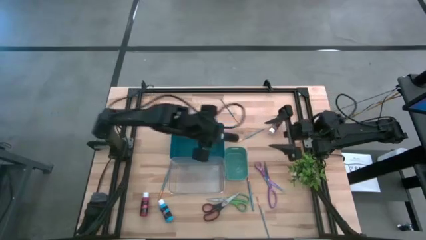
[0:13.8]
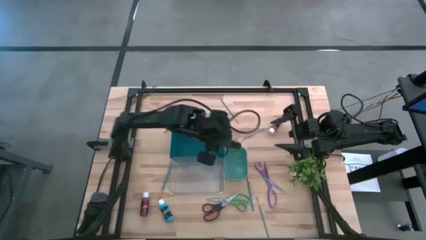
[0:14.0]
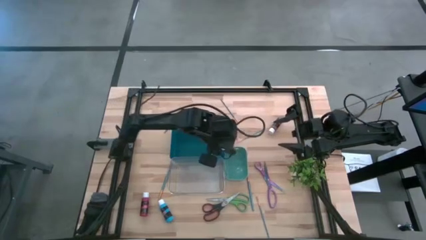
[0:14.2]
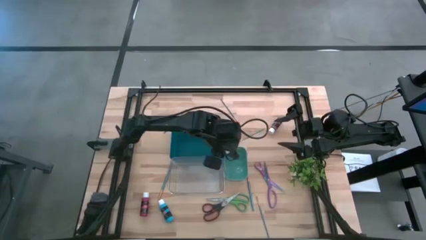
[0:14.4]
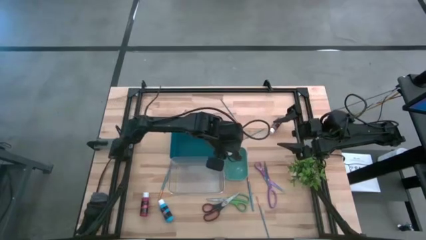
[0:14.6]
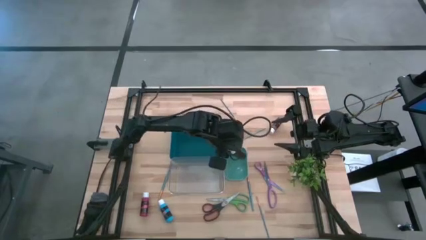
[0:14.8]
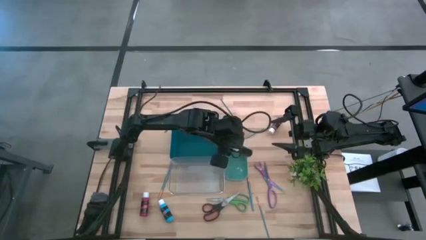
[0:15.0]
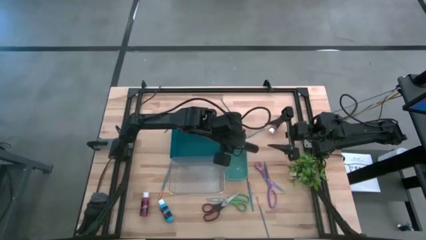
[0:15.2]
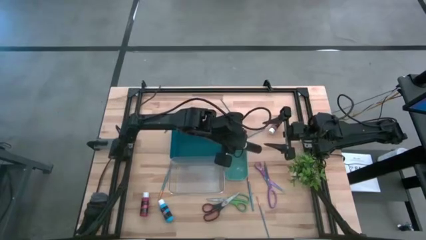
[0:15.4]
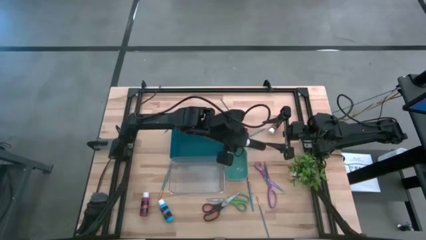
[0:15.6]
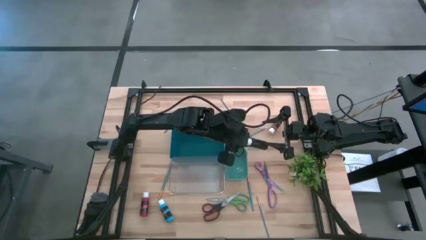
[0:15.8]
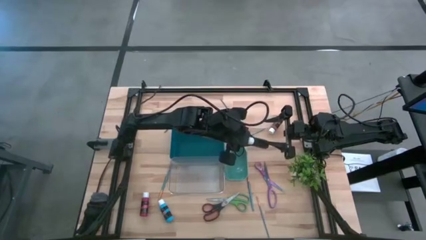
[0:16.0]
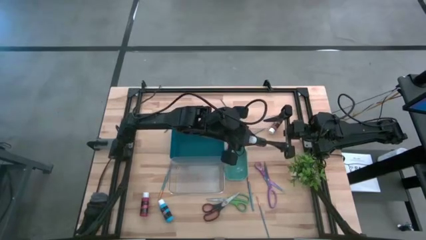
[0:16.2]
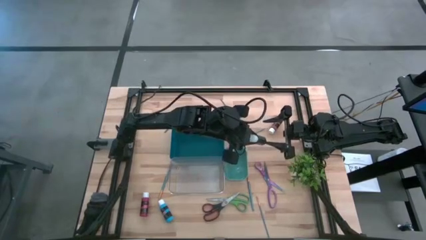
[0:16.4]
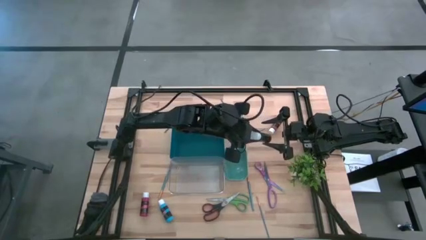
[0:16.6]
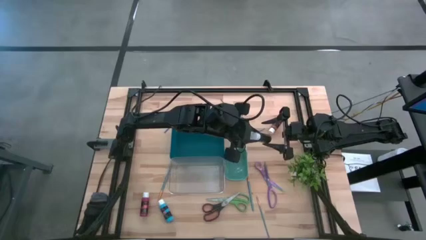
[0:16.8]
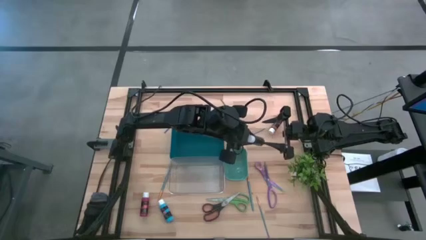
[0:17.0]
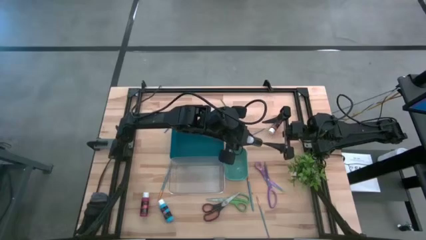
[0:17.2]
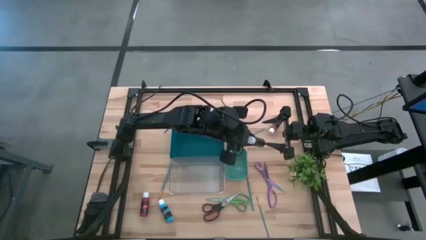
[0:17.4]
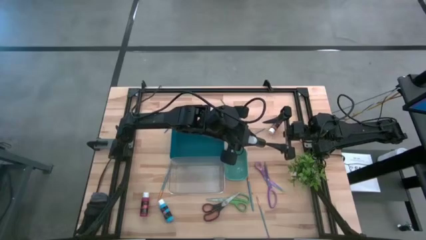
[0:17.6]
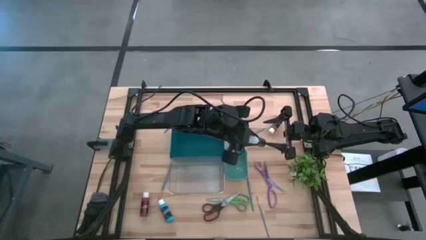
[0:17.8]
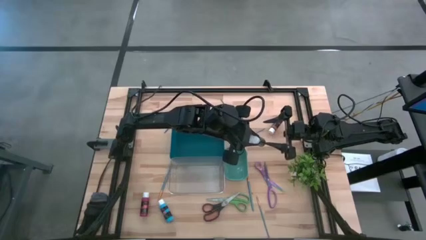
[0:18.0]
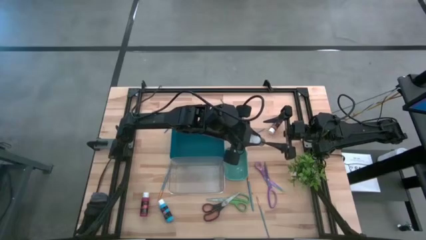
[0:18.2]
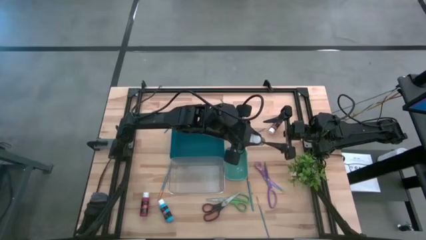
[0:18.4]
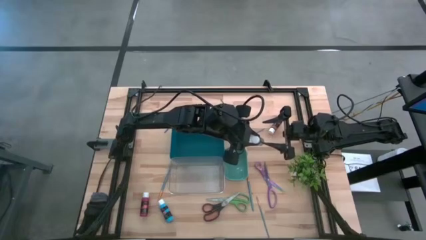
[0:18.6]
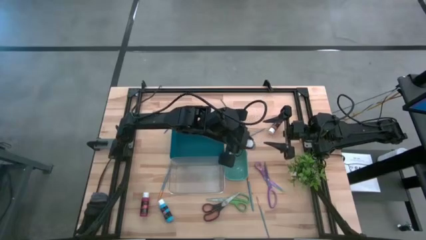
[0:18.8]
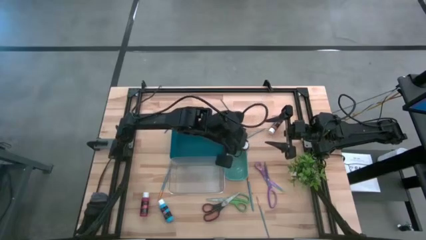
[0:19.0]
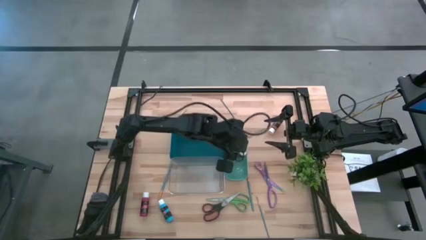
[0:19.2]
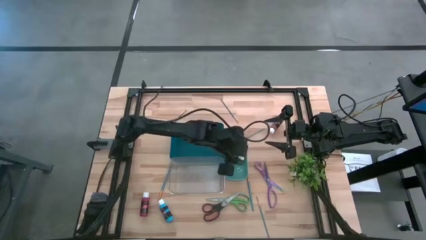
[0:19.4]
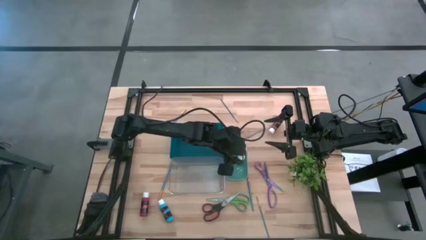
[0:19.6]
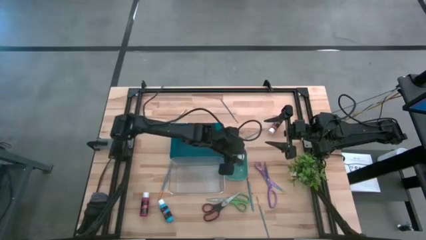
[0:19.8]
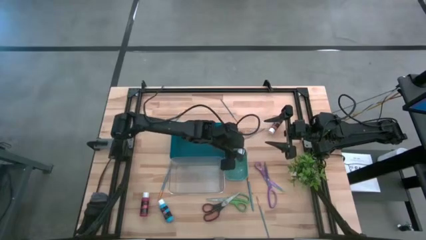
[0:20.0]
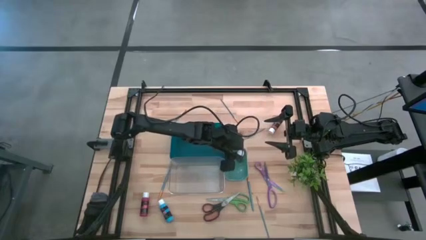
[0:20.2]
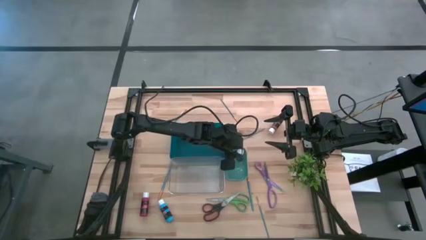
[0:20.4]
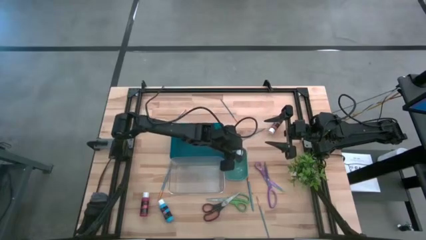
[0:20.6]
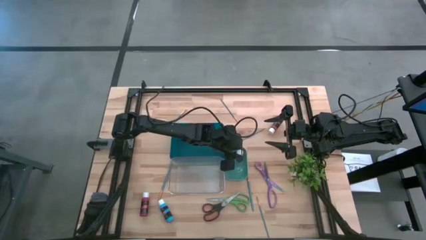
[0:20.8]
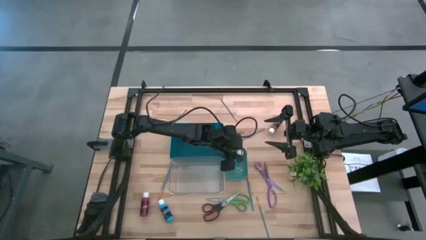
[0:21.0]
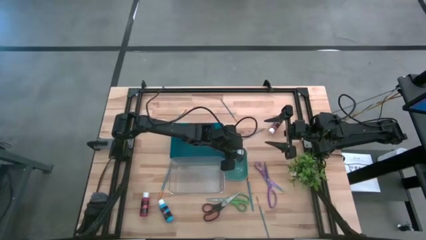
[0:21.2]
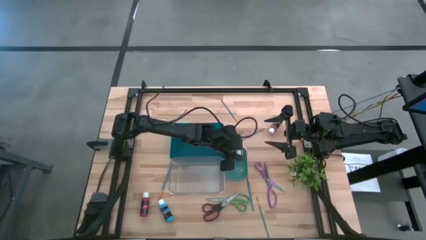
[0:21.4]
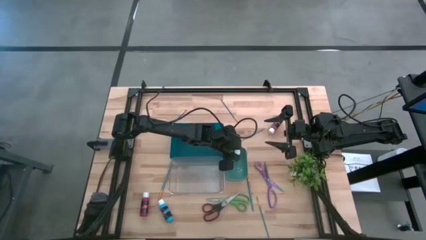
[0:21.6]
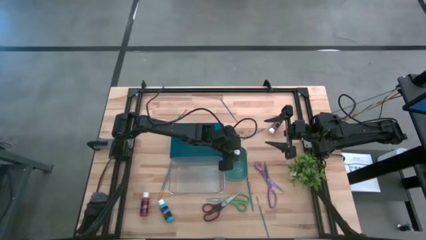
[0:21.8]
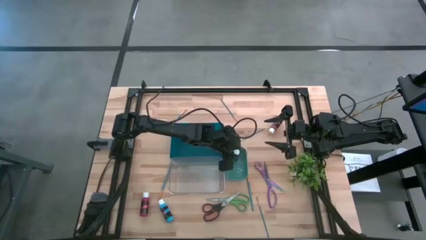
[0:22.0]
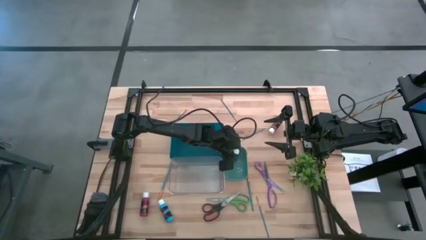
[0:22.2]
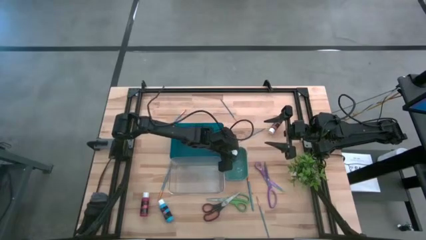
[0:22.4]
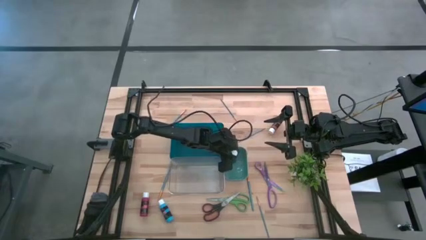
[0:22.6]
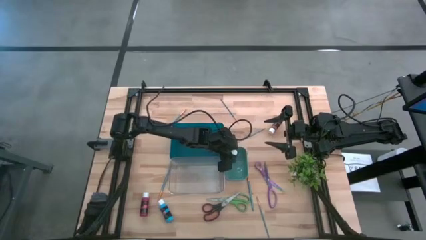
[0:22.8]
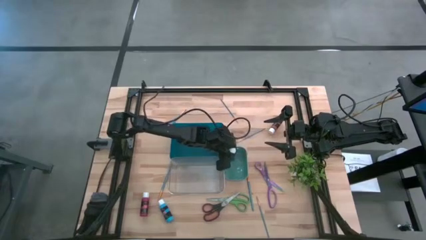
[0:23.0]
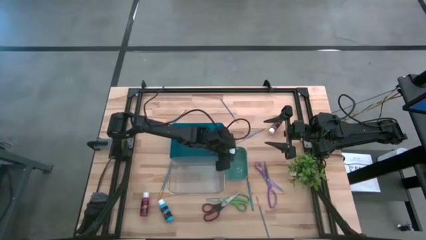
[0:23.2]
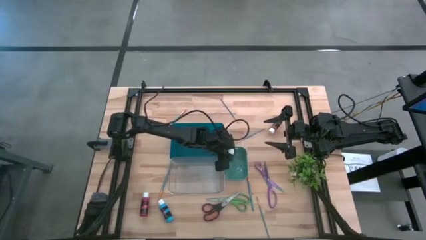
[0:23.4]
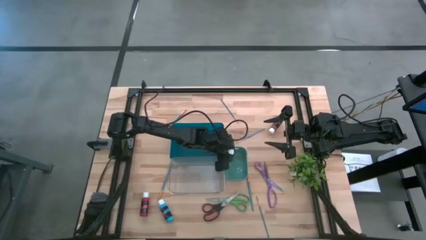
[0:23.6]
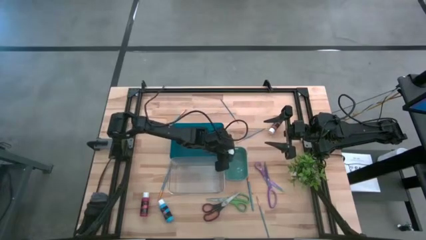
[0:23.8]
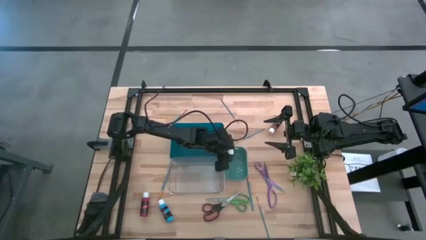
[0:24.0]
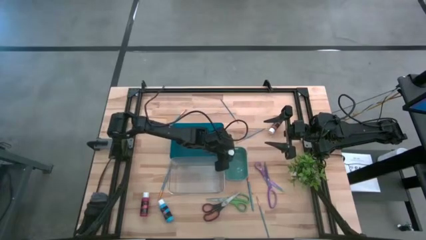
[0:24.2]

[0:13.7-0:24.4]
Task: Pick & Place Paint Supplies
Put the black paint bottle into the green bin

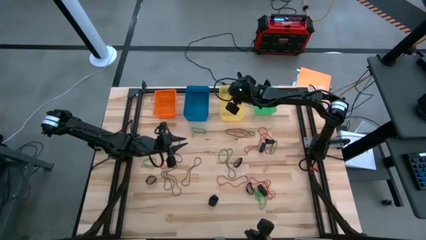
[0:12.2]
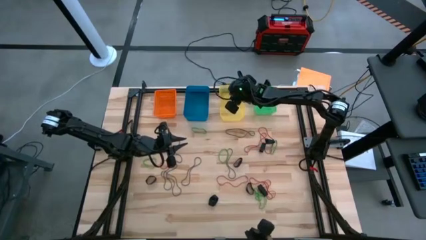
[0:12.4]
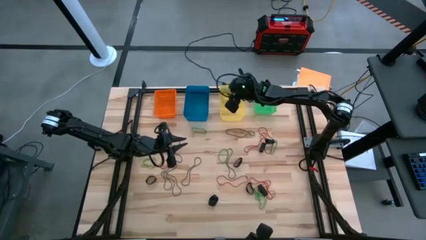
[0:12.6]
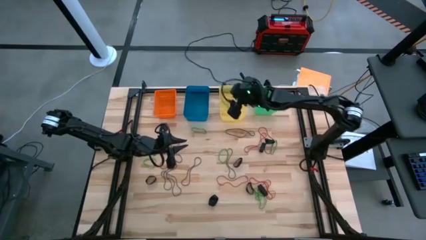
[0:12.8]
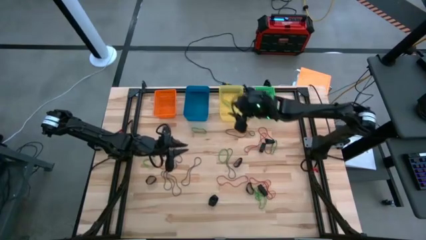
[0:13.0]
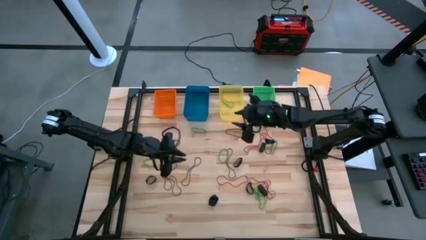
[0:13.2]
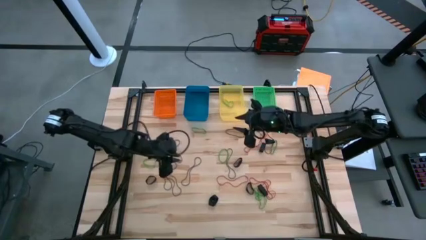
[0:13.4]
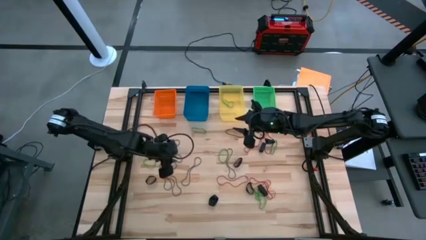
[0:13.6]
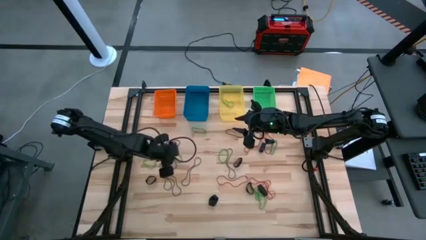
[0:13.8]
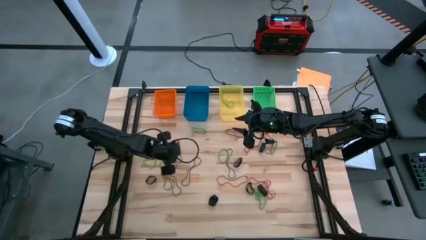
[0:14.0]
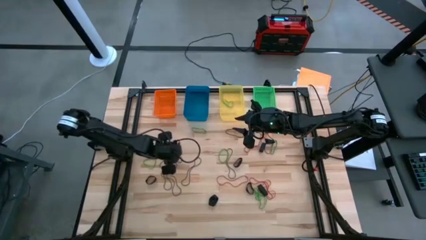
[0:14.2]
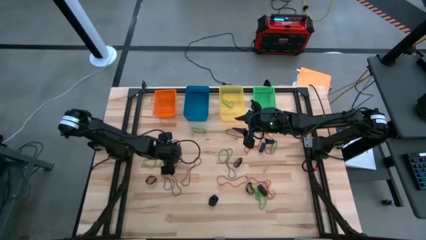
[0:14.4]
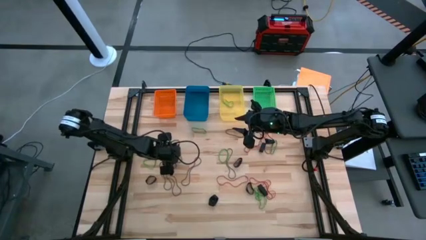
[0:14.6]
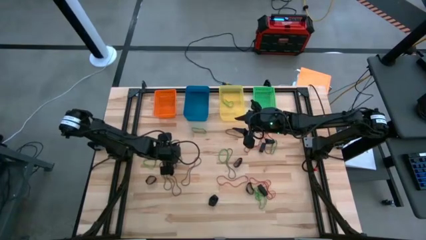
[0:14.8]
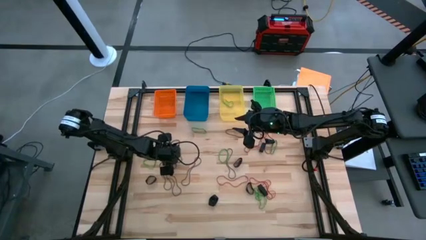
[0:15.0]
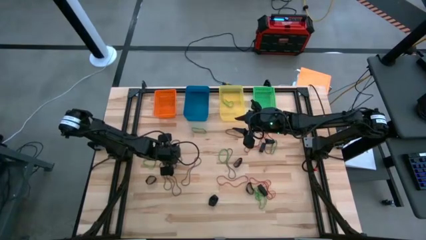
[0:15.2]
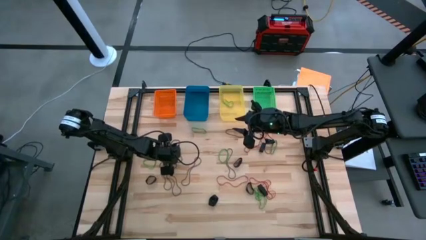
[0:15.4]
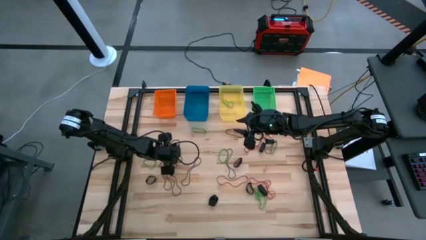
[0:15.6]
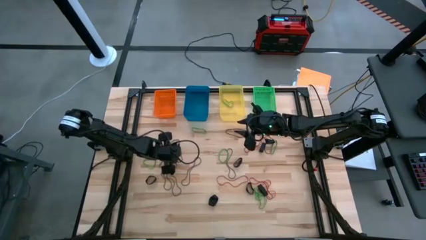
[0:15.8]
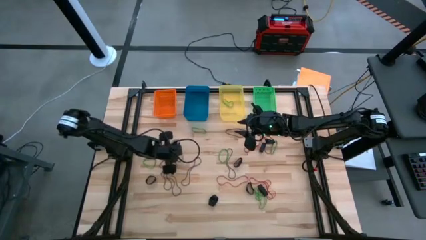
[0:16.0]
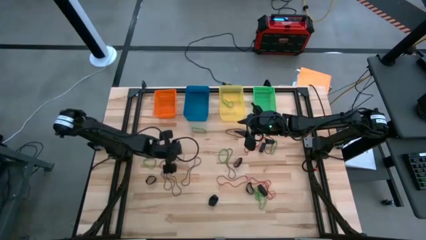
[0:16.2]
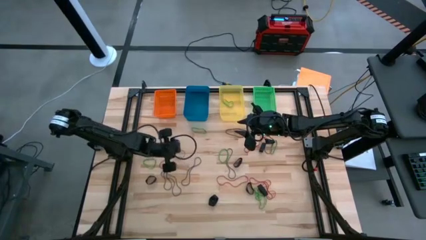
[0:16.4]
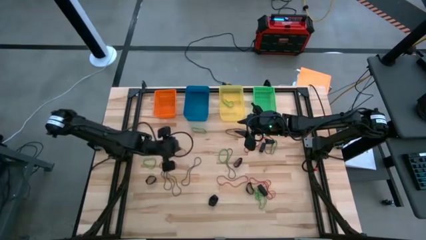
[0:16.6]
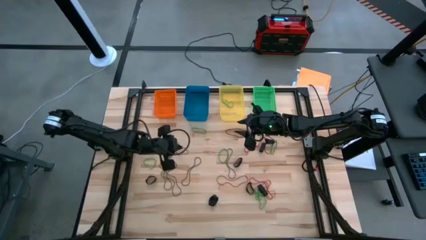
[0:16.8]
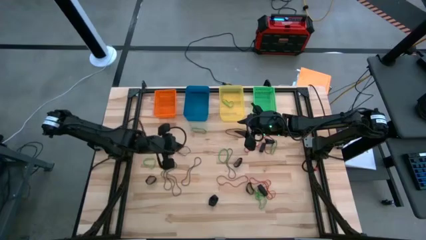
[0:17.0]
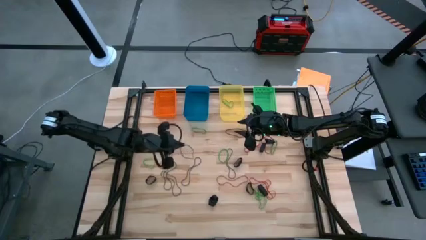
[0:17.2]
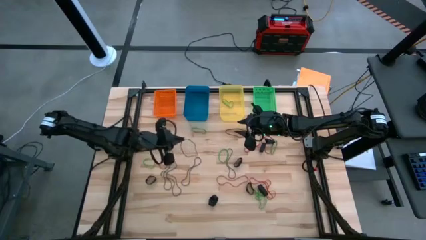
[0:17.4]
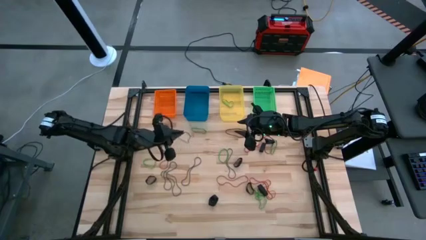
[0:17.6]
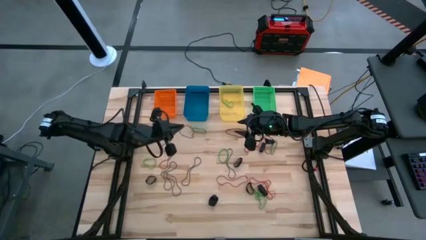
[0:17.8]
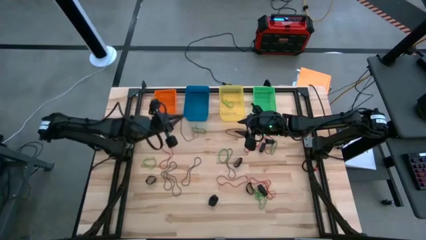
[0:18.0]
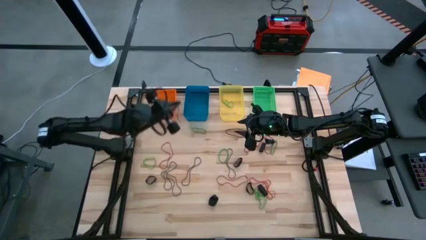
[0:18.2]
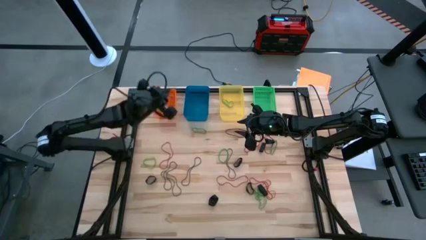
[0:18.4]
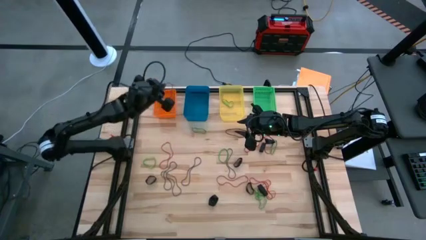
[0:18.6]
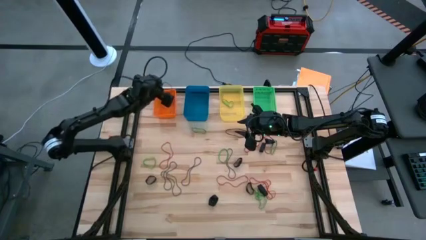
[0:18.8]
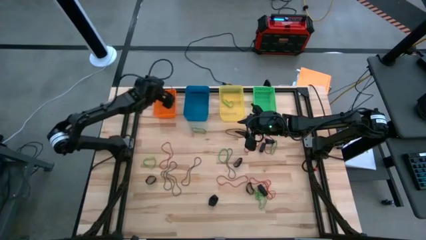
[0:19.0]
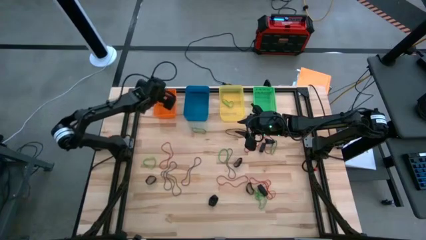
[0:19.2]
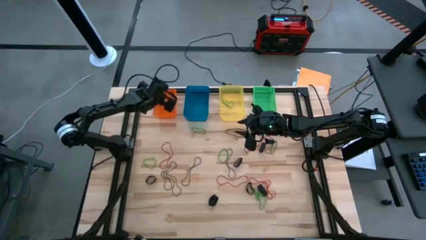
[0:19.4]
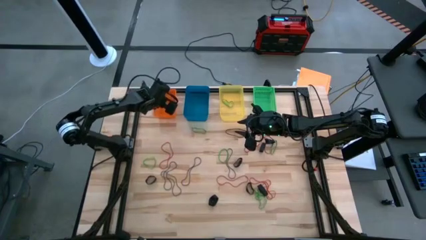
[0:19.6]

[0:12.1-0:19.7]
Task: Sort rubber bands into baskets
Put the violet rubber band into the orange bin
